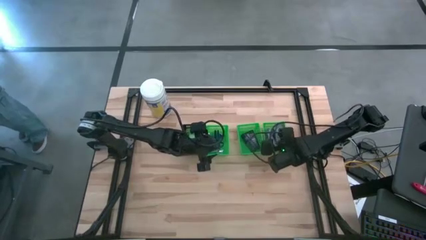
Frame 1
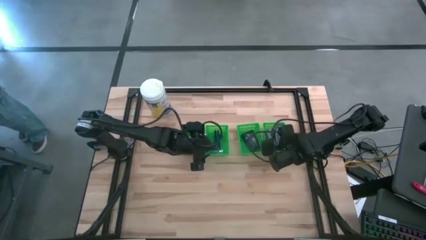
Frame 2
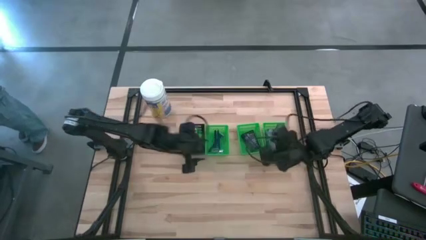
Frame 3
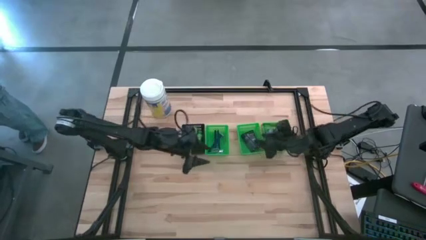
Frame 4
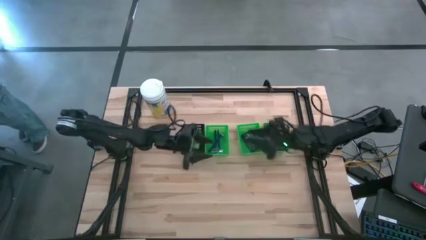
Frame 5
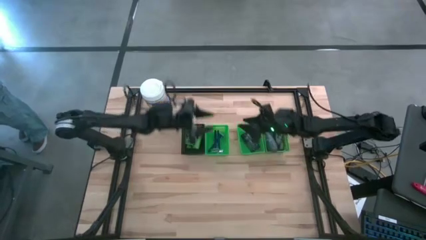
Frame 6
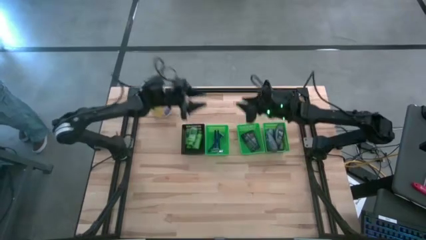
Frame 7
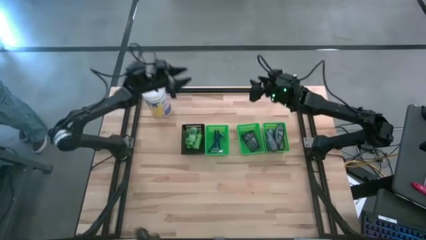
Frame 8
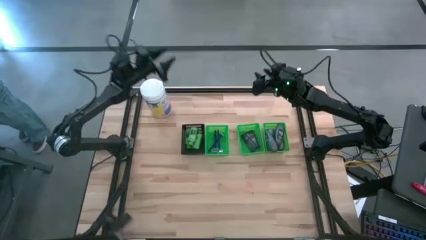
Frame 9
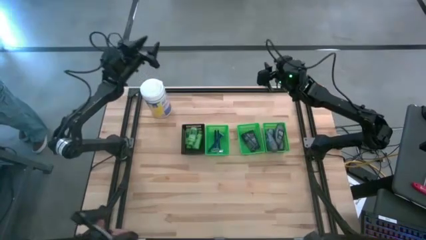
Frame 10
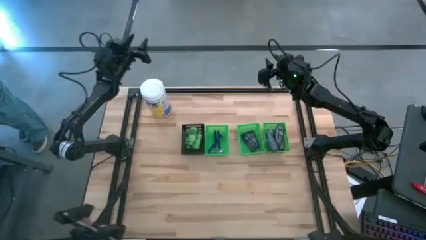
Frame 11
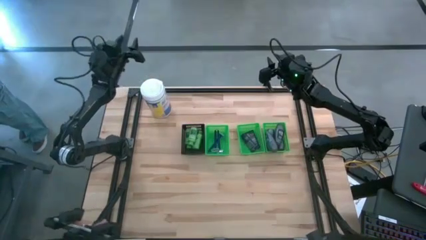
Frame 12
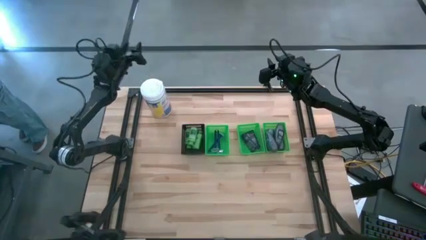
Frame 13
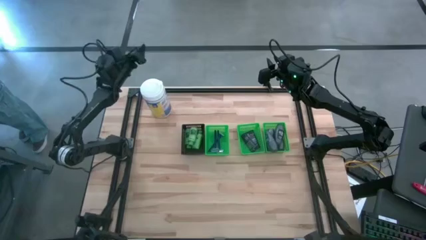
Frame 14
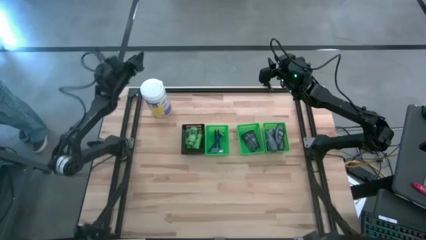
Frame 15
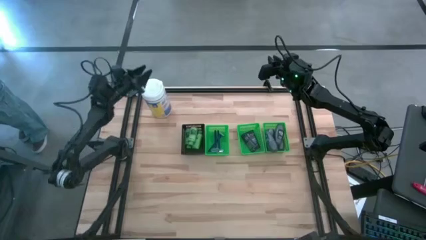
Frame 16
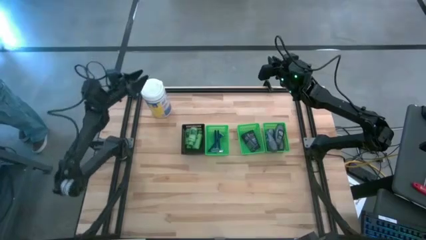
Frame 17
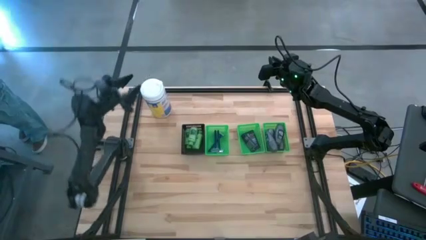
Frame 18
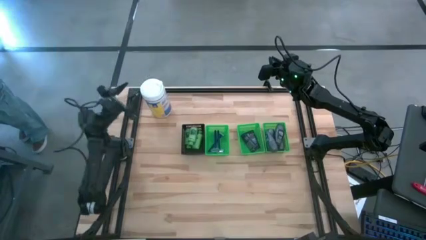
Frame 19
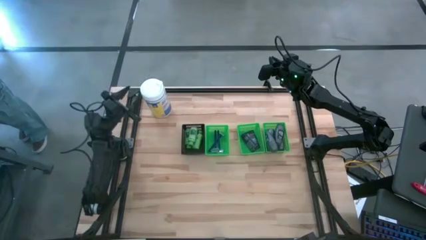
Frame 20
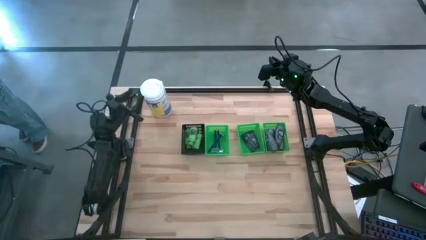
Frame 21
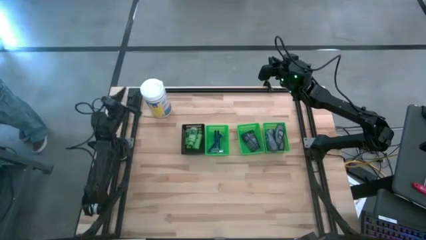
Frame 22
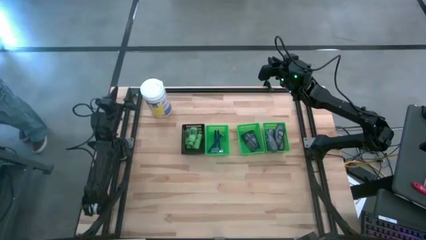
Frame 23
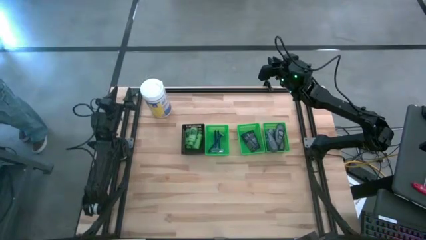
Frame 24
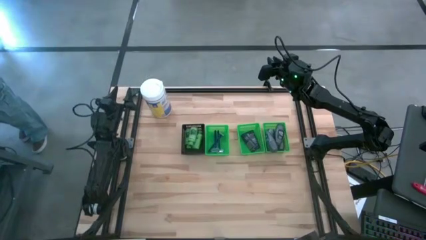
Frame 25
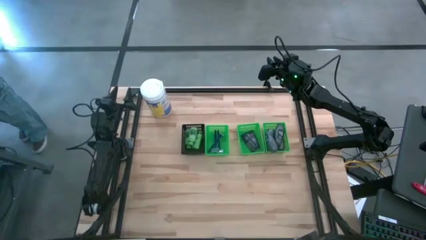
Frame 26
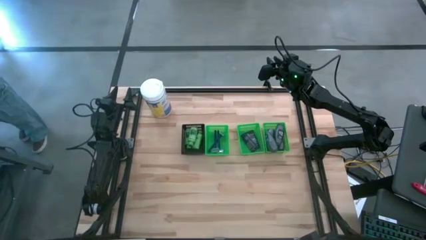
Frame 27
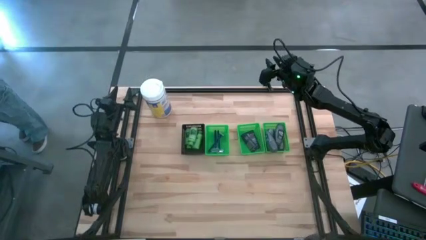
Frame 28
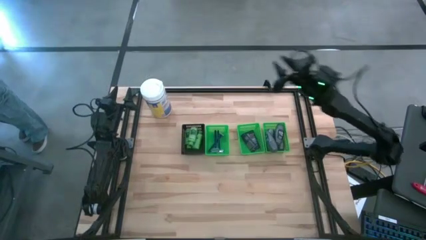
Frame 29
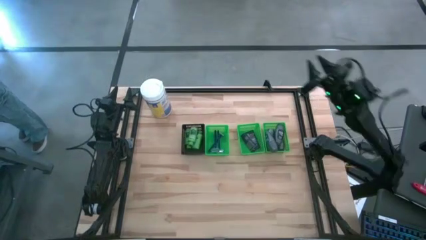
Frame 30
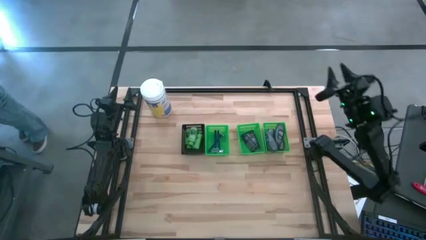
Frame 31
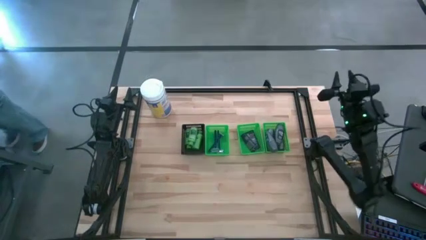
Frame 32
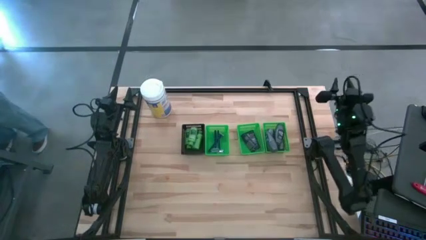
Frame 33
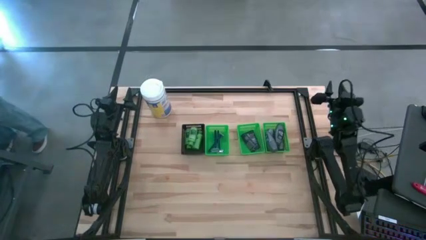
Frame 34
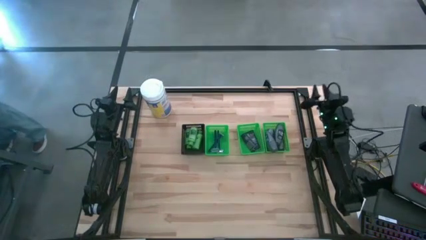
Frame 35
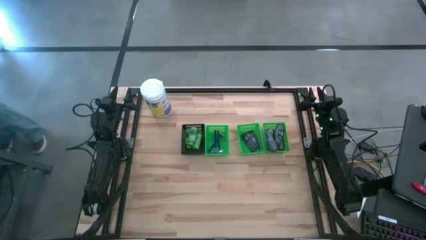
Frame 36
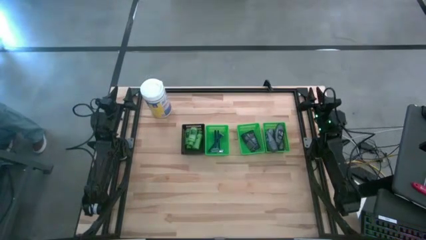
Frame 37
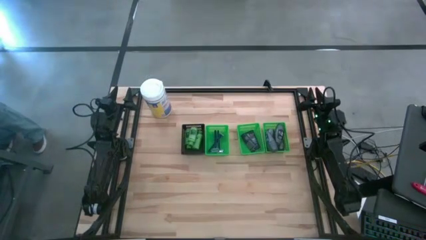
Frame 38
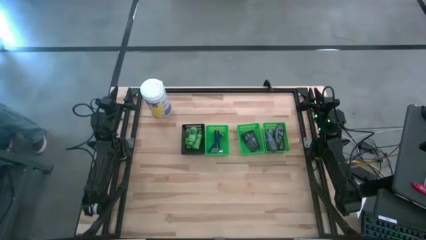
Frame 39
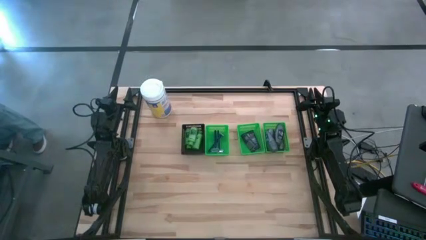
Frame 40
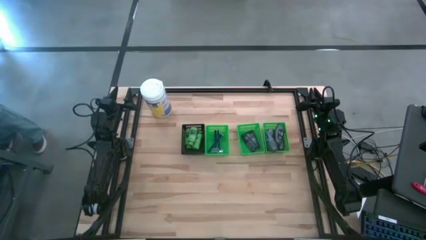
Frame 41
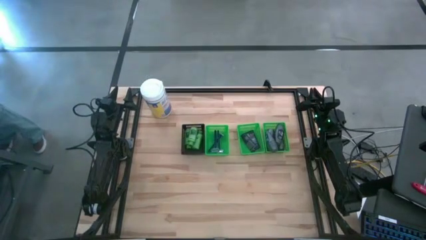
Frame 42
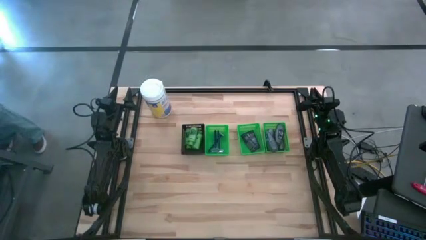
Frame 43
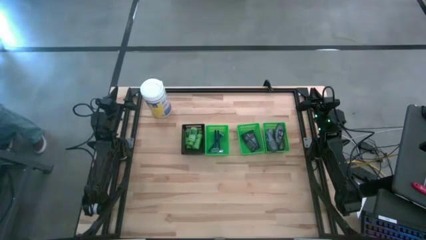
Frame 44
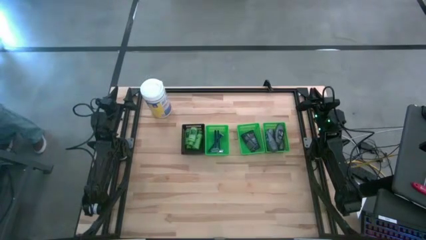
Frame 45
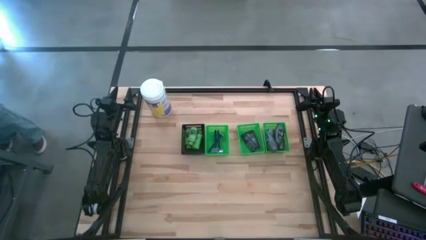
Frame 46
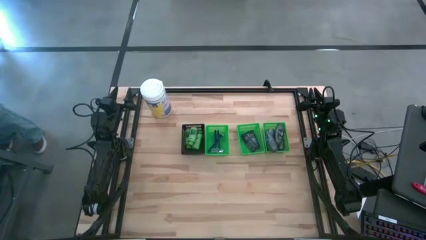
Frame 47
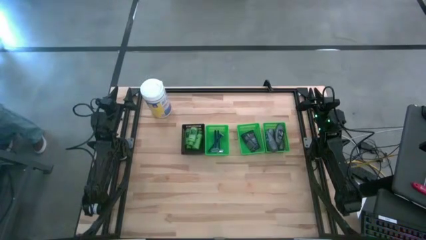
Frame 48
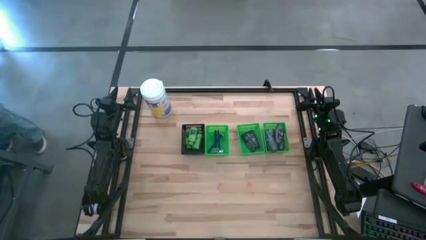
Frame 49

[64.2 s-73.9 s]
Task: Pick & Place Travel size toiletries
Return to Home Position

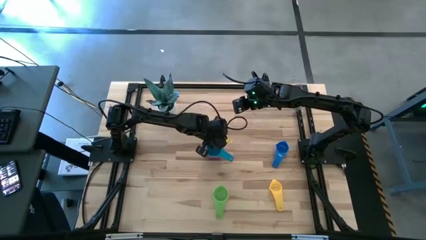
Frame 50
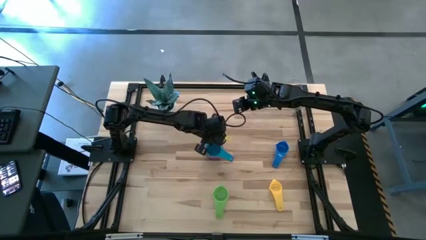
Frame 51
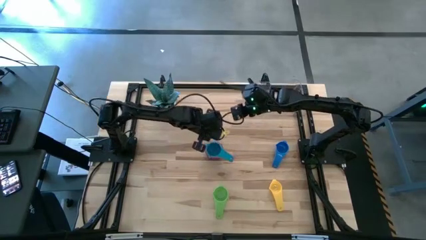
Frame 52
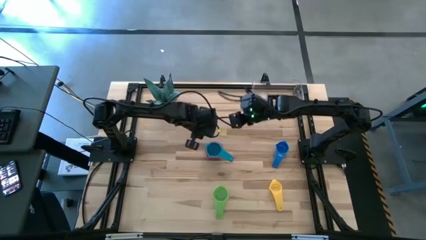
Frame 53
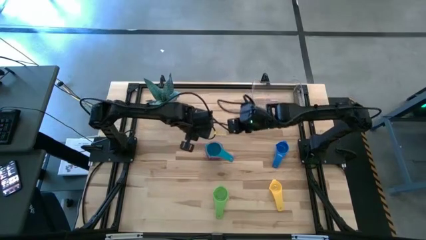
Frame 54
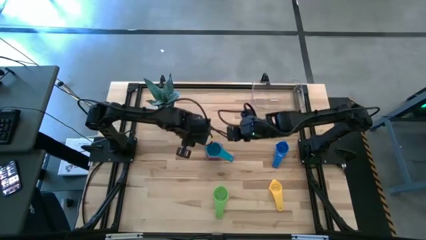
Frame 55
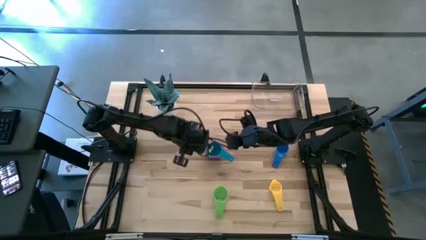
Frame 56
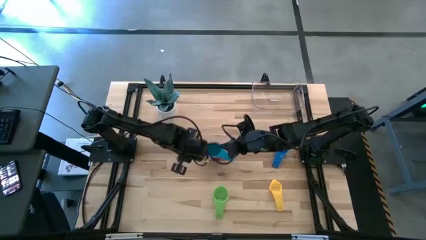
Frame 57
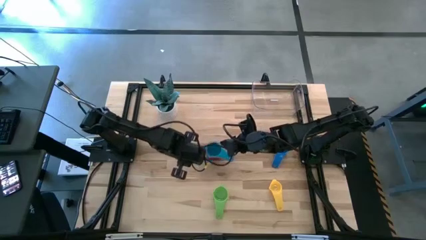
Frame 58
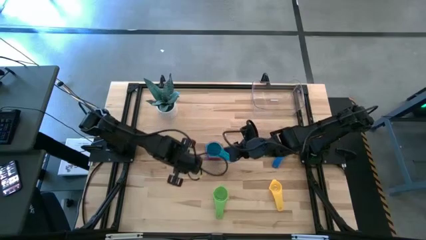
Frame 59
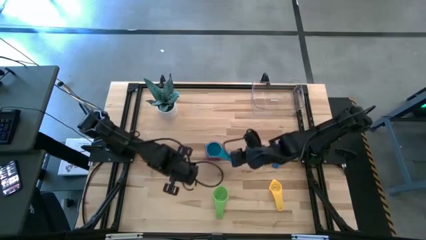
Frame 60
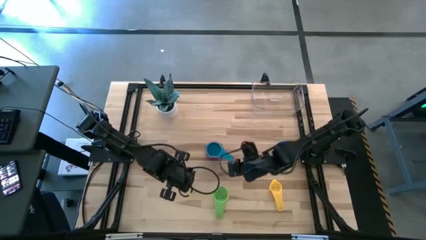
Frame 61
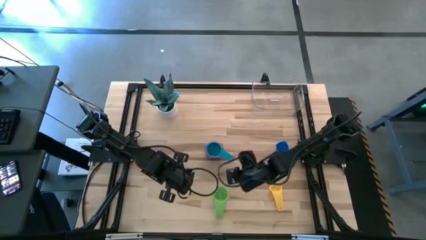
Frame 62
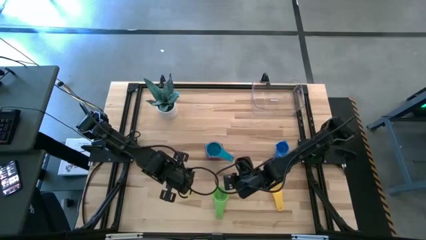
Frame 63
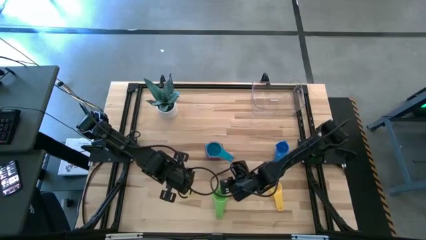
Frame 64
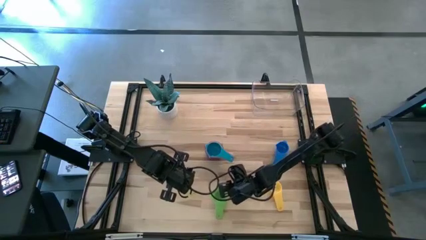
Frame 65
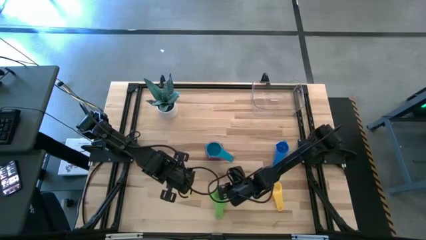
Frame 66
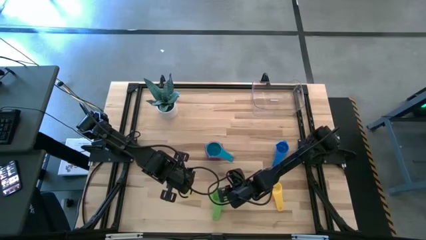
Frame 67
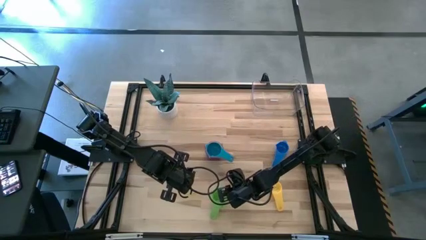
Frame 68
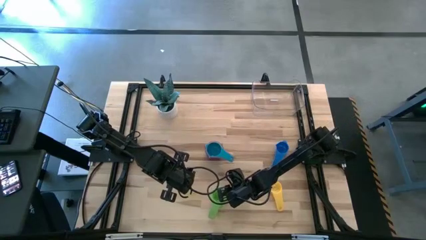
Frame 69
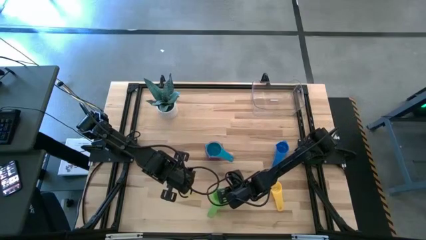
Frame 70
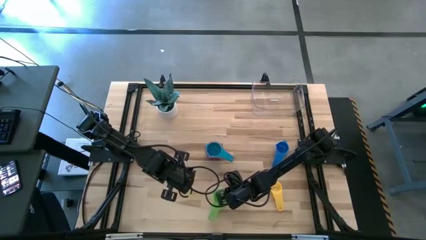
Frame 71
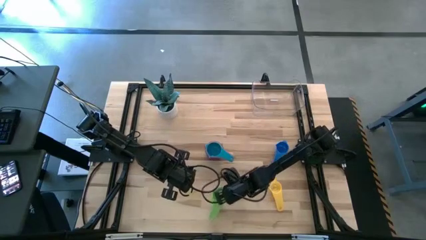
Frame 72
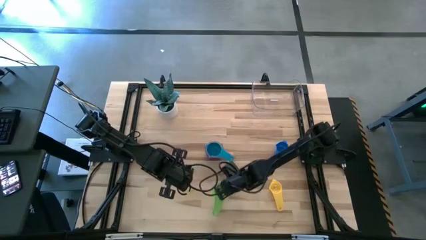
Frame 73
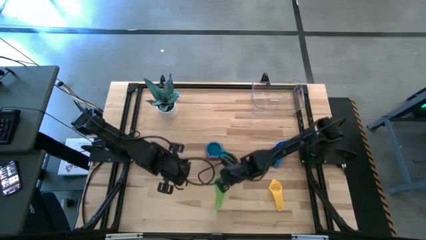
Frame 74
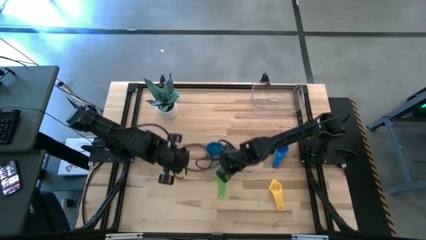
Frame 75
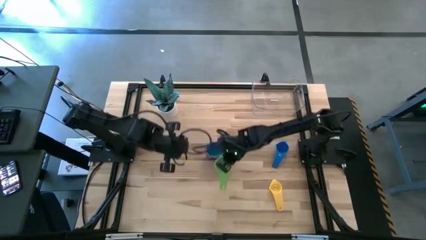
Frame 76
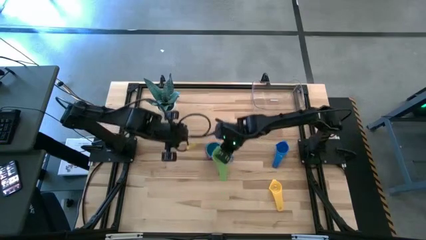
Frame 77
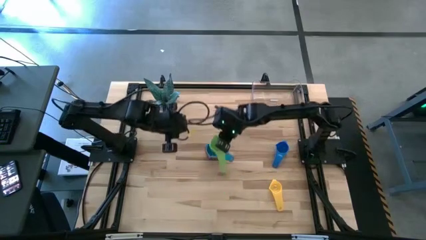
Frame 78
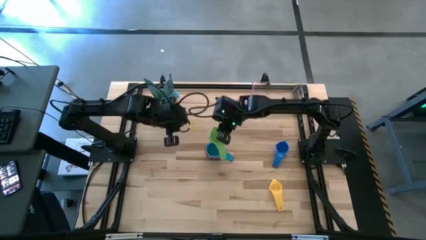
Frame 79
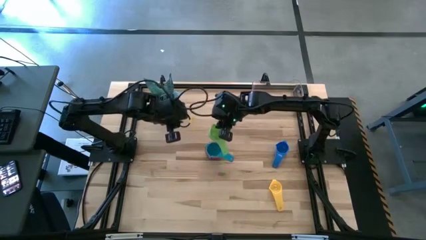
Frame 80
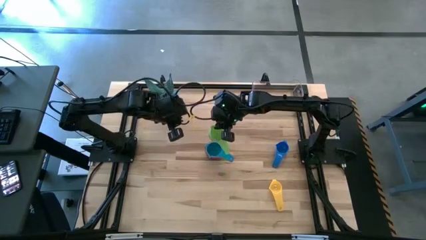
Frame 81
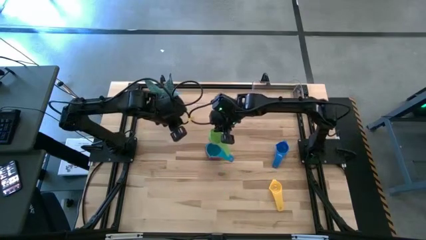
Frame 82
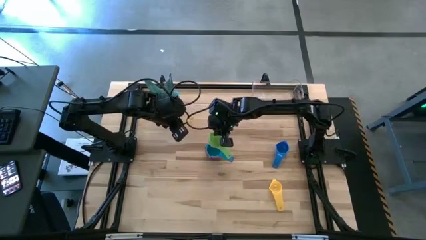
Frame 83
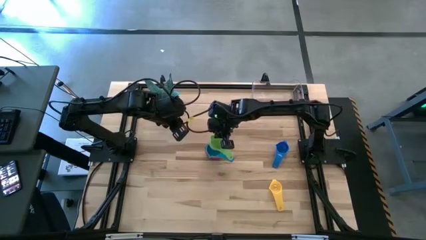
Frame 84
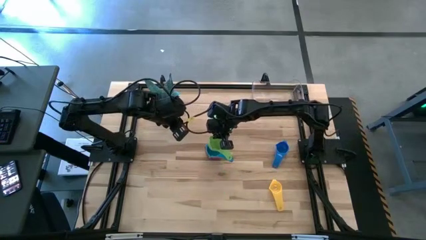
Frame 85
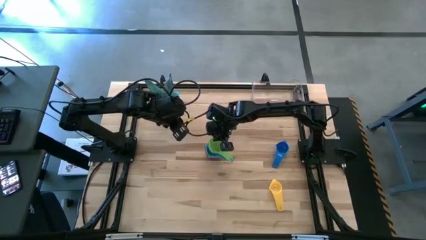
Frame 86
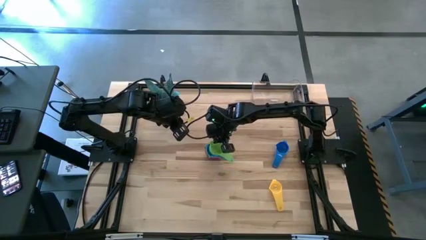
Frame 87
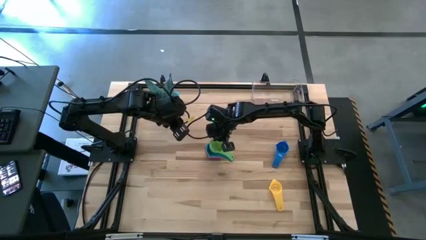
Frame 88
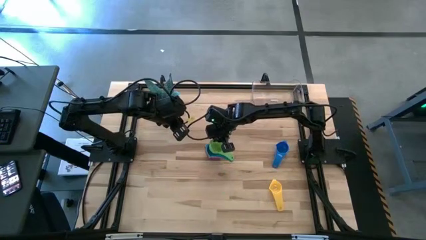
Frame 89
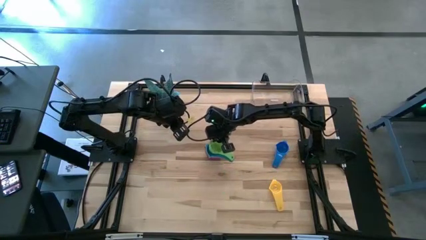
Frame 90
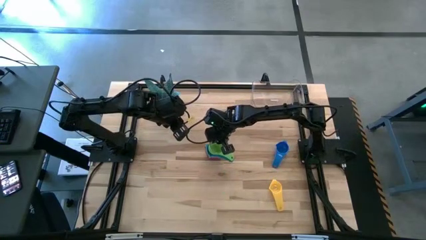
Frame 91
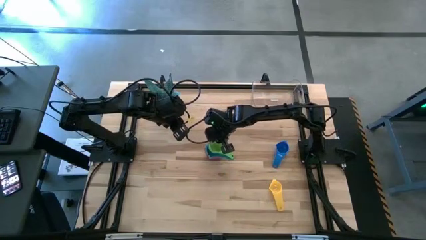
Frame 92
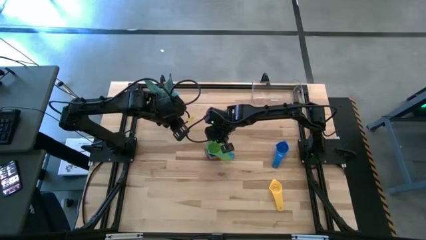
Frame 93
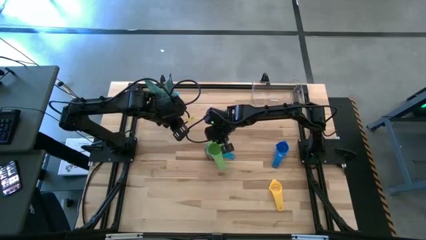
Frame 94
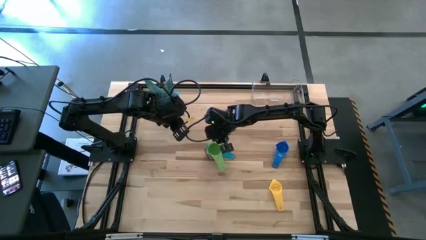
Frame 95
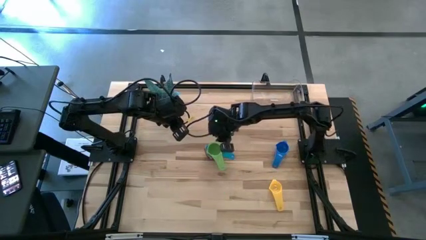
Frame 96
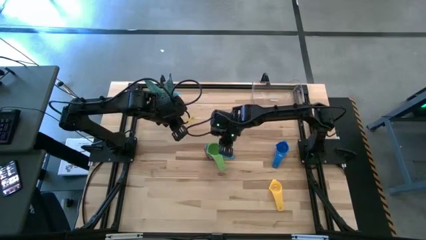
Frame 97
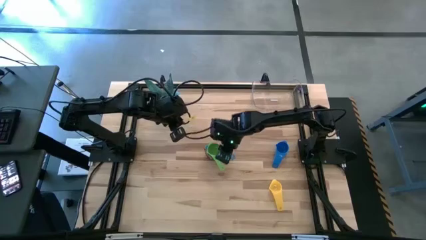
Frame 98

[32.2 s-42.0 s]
Task: Nest measuring cups in basket
Stack the green measuring cup on top of the light blue measuring cup
